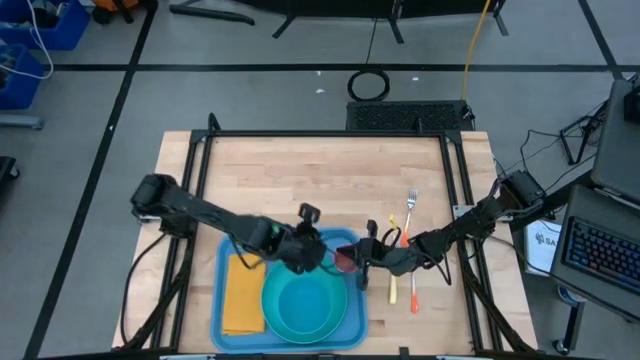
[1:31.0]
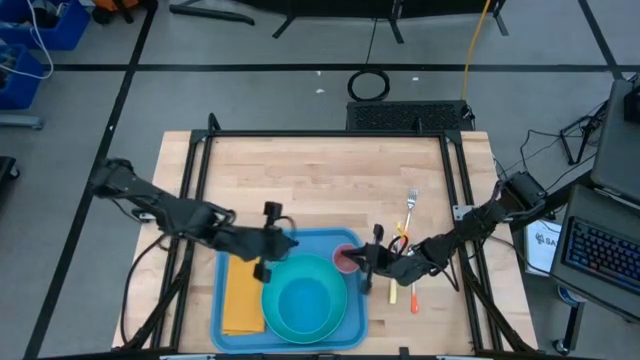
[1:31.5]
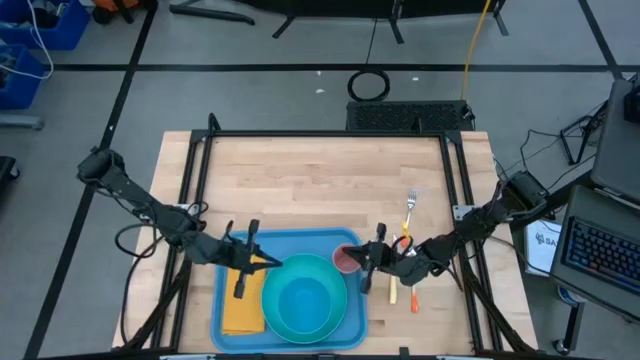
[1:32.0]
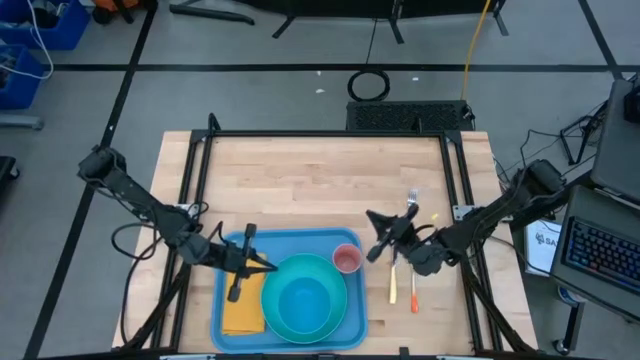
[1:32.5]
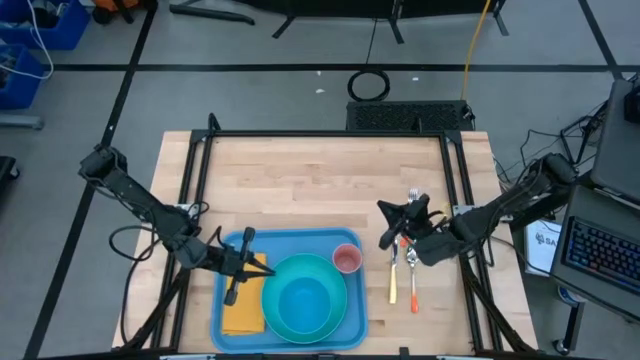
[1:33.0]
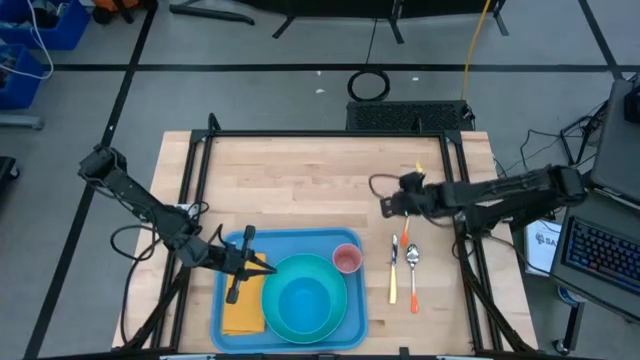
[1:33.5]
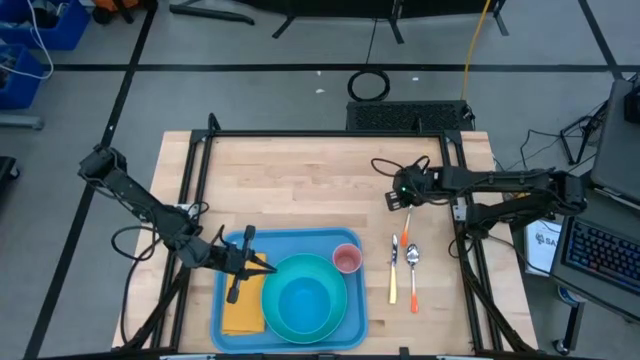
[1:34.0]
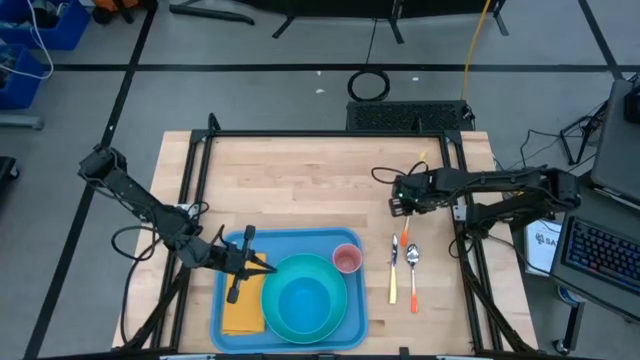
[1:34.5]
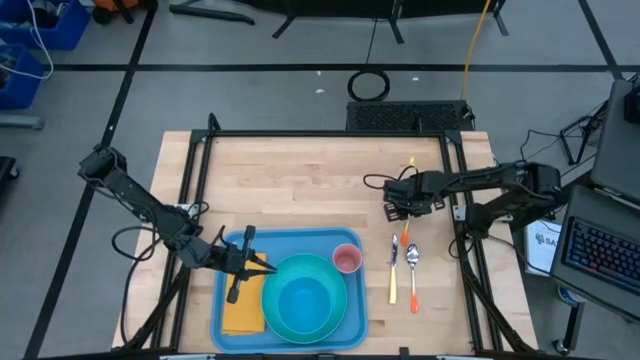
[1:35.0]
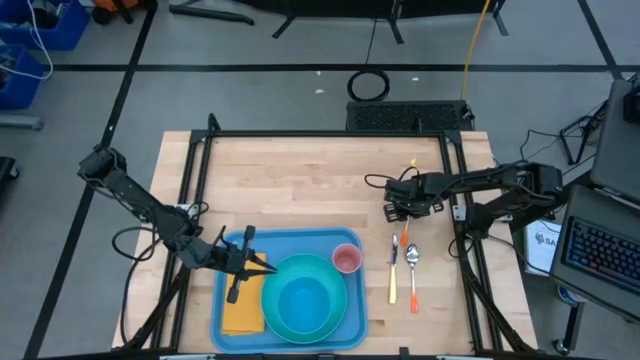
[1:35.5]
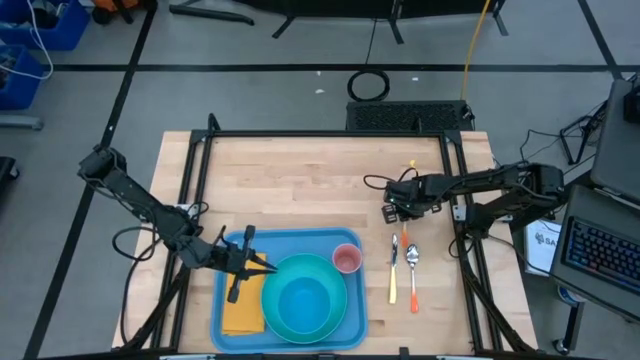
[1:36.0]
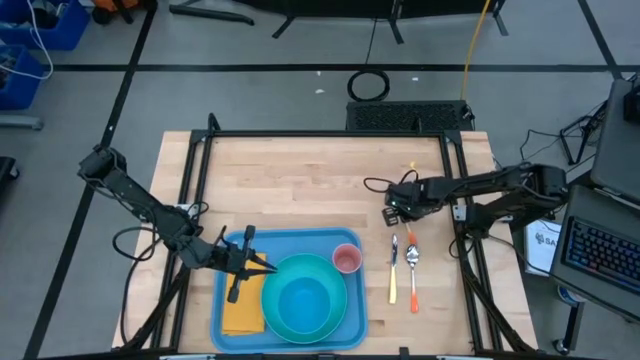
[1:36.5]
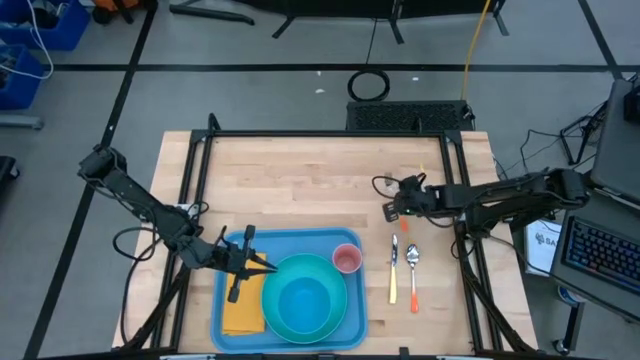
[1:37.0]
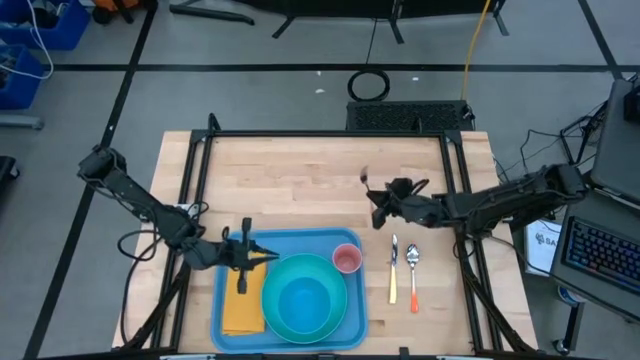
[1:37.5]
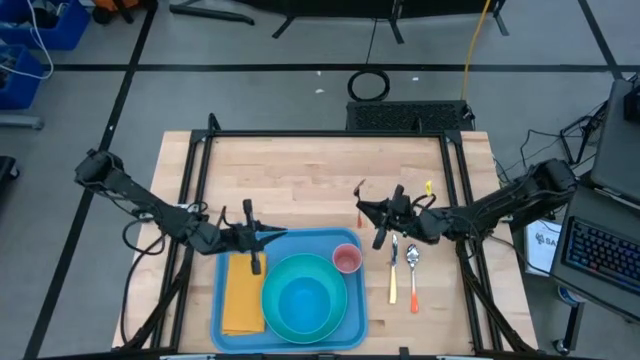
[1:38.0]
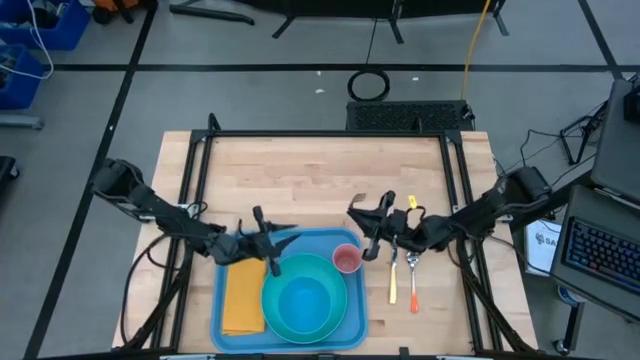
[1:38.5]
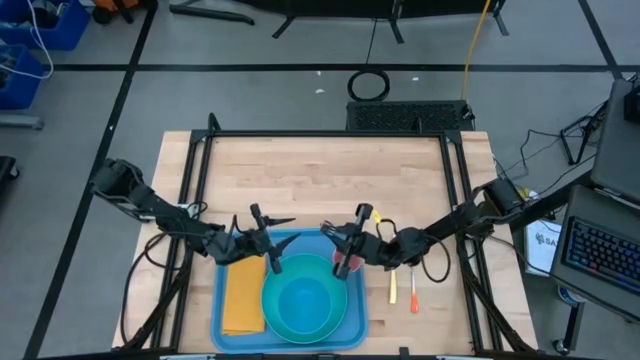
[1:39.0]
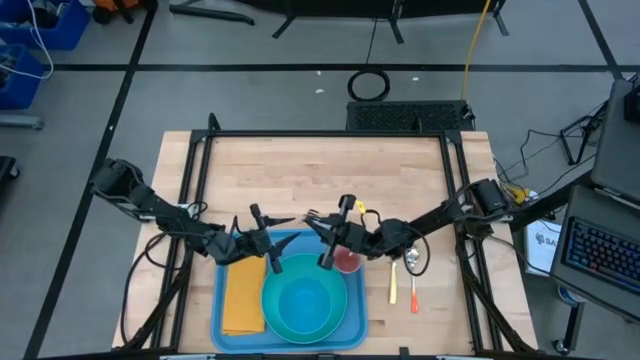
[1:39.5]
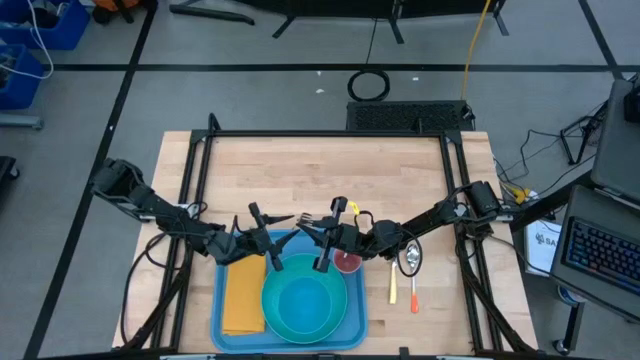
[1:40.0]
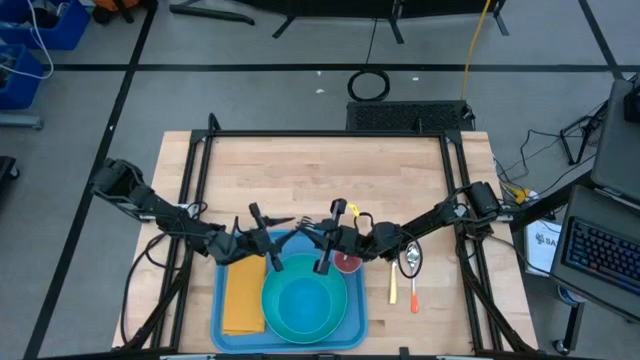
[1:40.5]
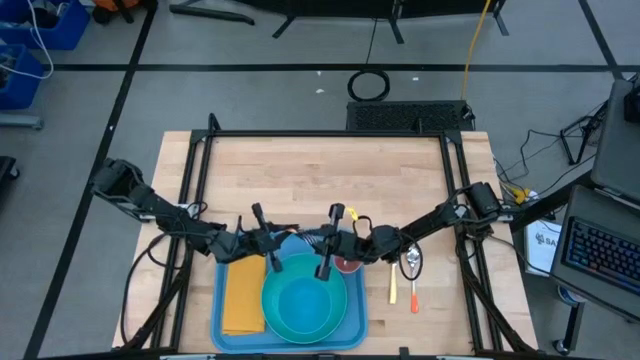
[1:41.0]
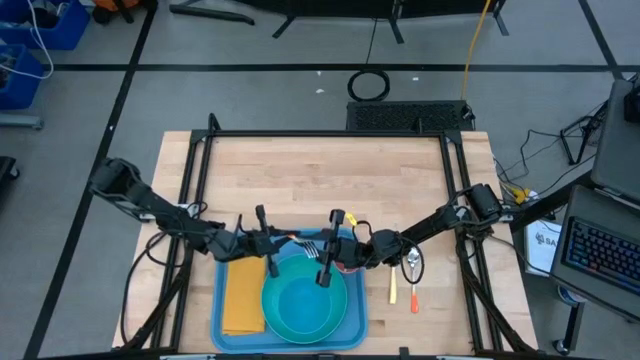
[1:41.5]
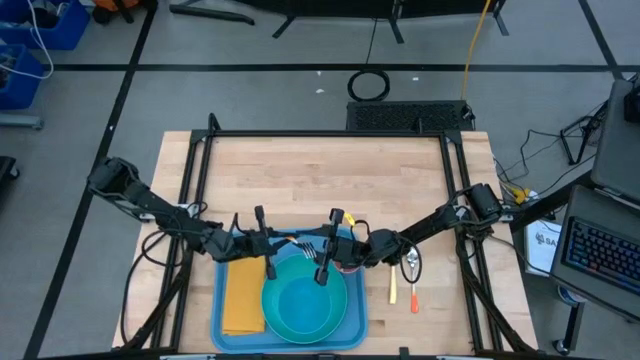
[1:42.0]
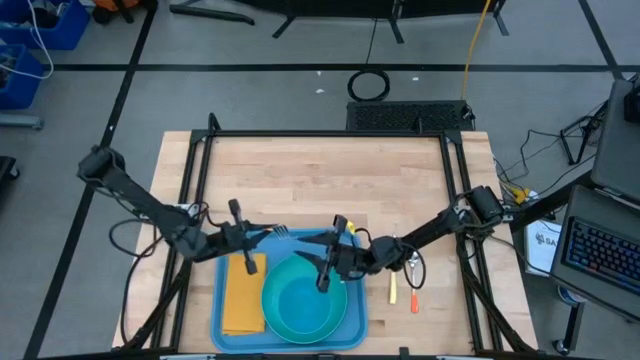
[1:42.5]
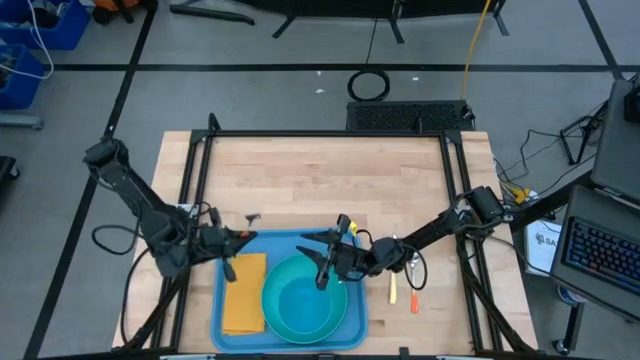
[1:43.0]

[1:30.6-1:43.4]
Task: Set up tray
Put the orange fork on the yellow table napkin
